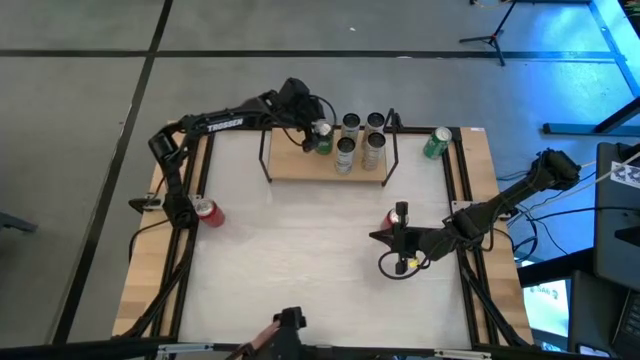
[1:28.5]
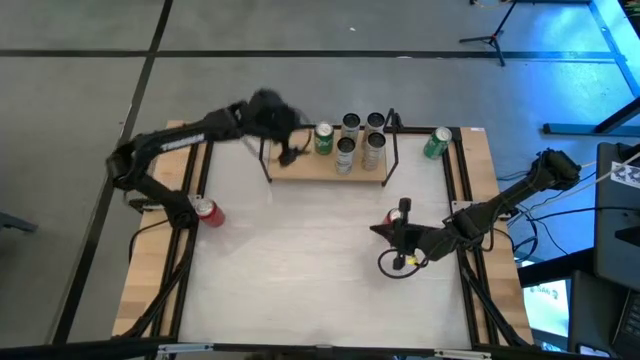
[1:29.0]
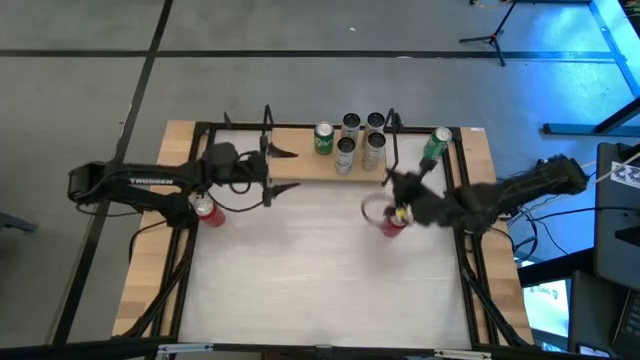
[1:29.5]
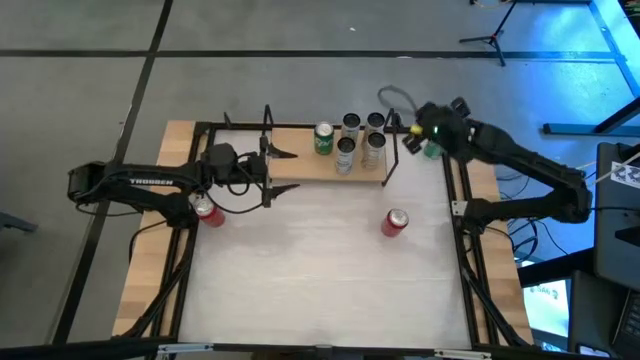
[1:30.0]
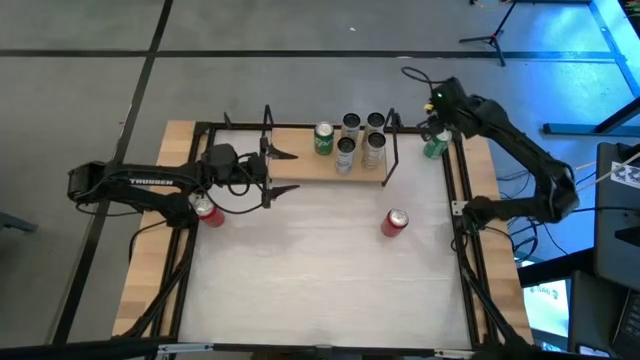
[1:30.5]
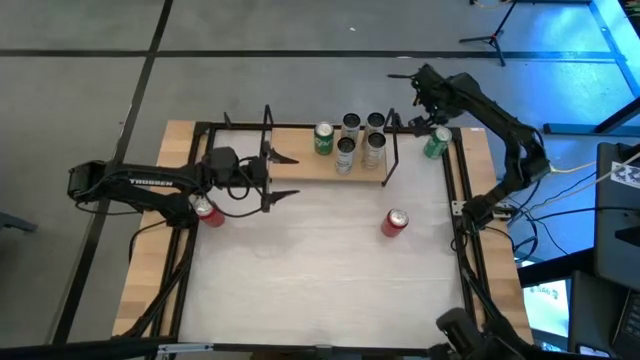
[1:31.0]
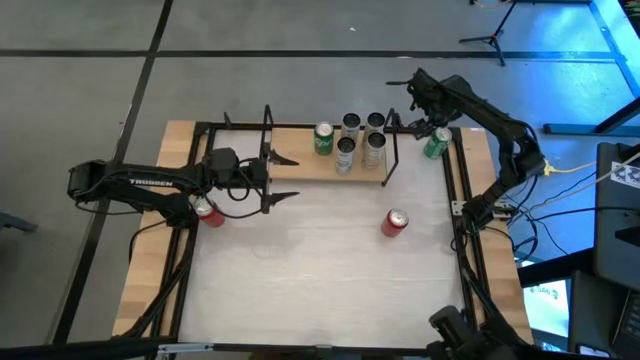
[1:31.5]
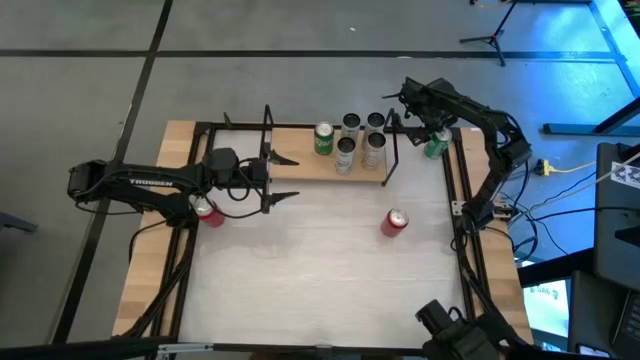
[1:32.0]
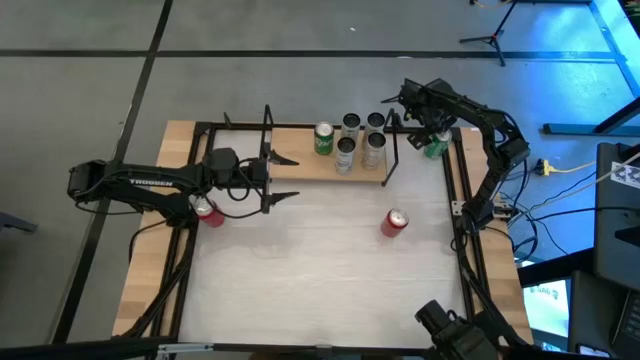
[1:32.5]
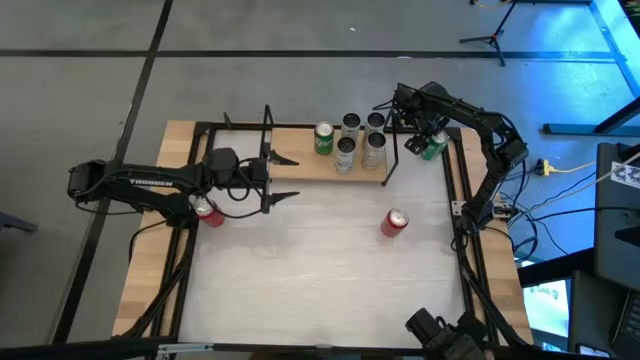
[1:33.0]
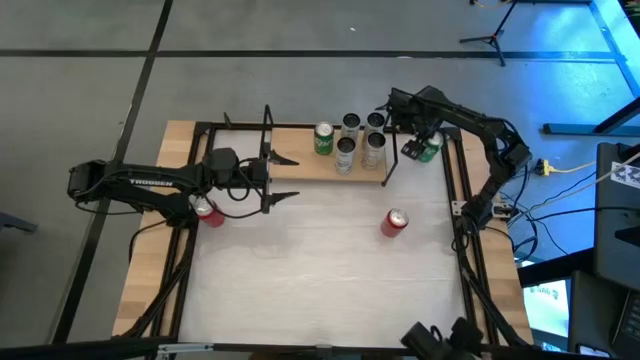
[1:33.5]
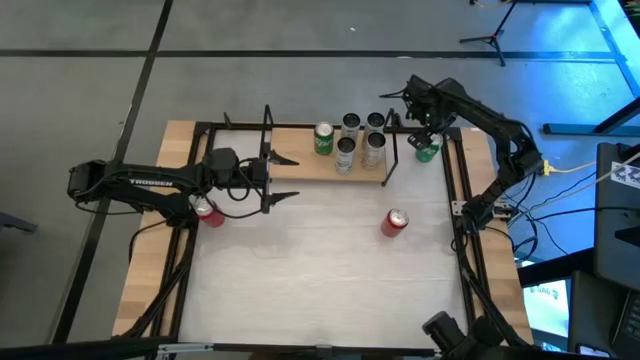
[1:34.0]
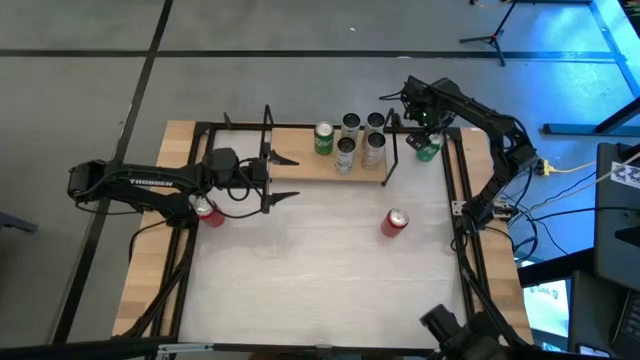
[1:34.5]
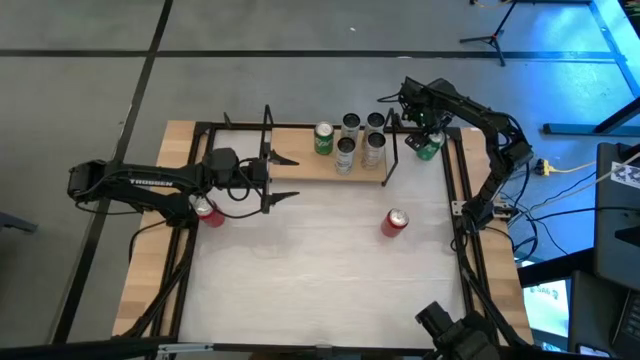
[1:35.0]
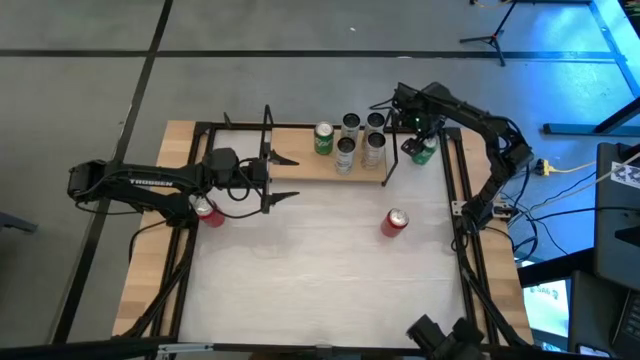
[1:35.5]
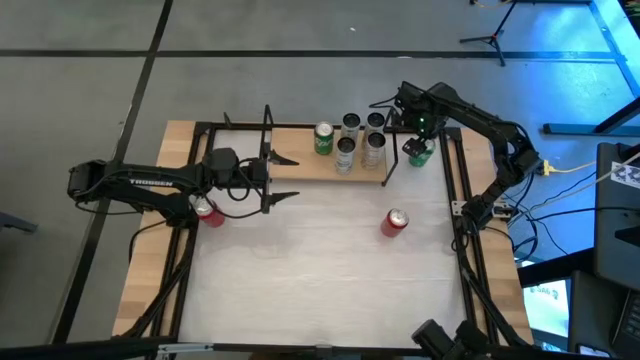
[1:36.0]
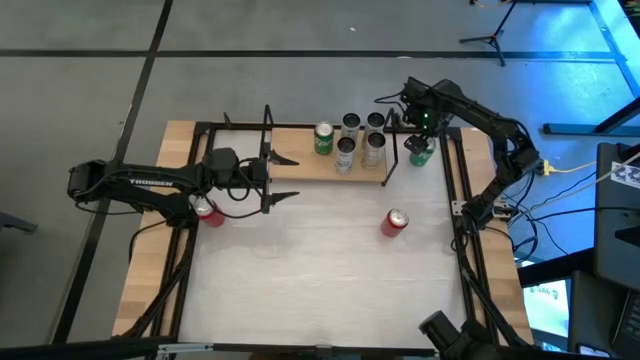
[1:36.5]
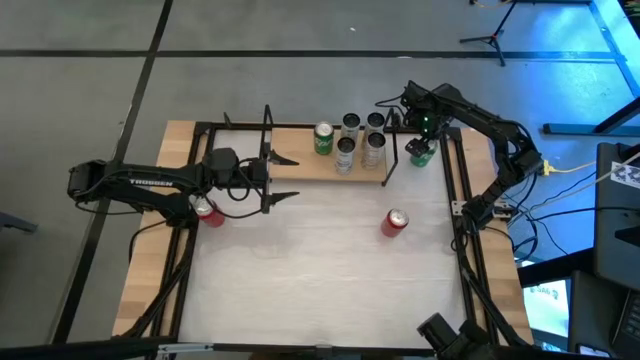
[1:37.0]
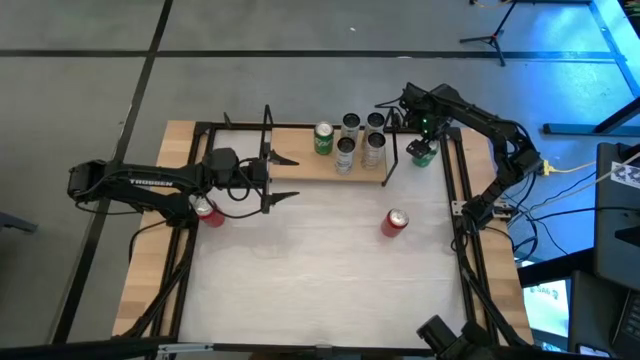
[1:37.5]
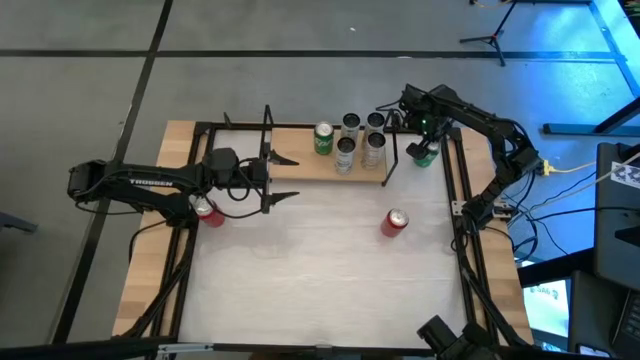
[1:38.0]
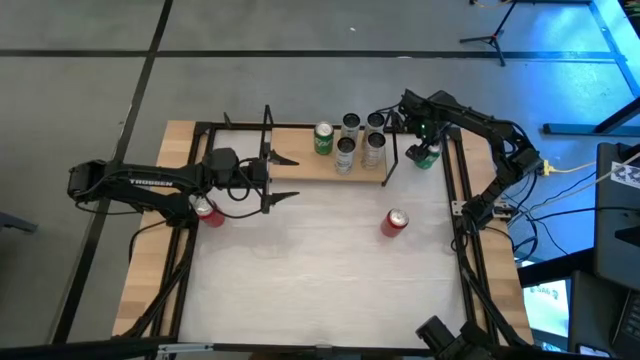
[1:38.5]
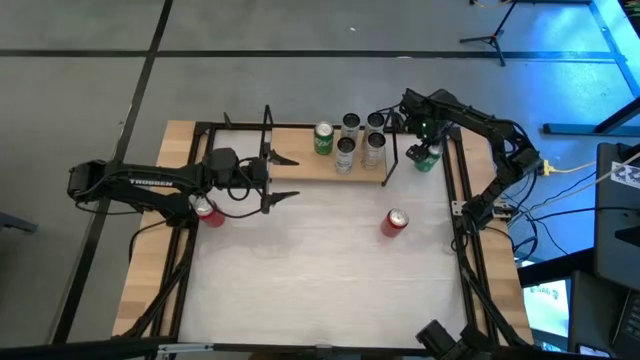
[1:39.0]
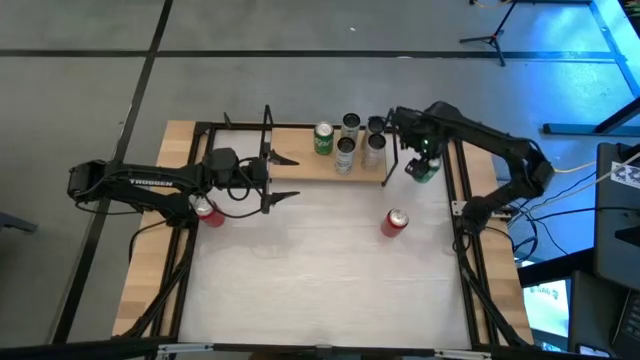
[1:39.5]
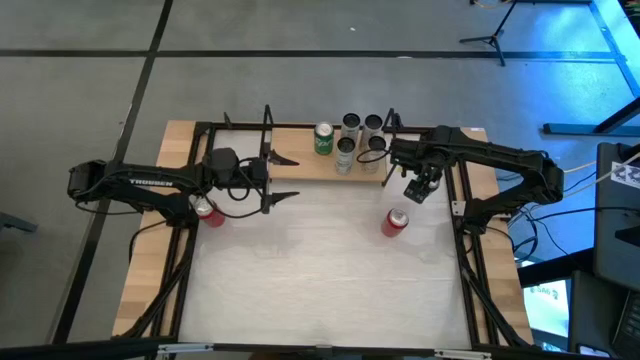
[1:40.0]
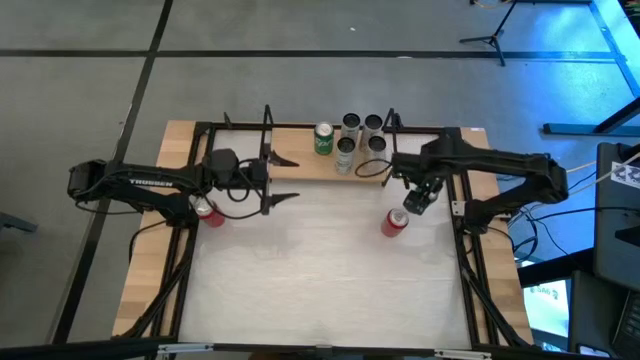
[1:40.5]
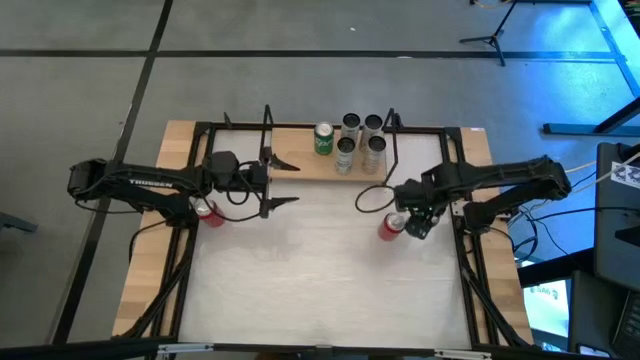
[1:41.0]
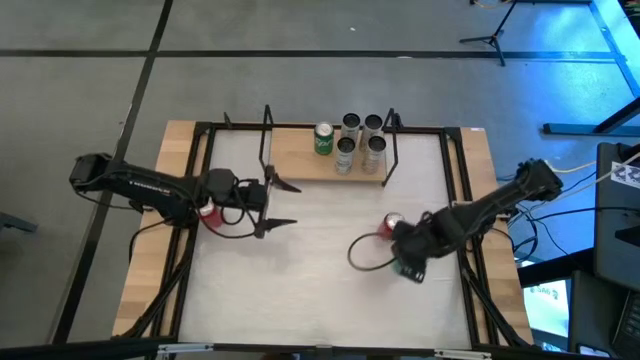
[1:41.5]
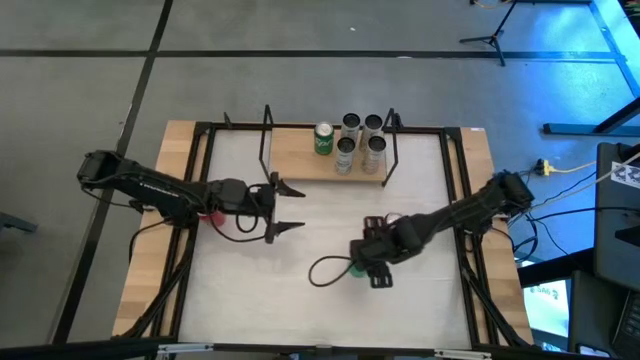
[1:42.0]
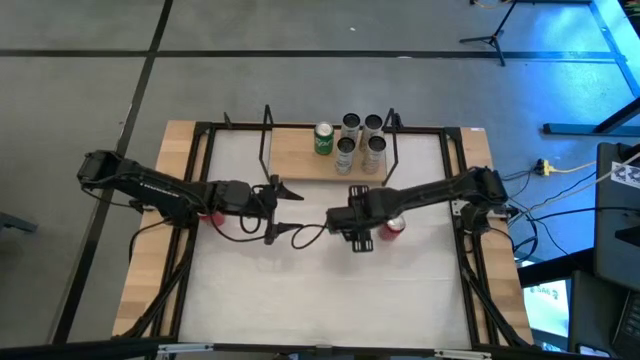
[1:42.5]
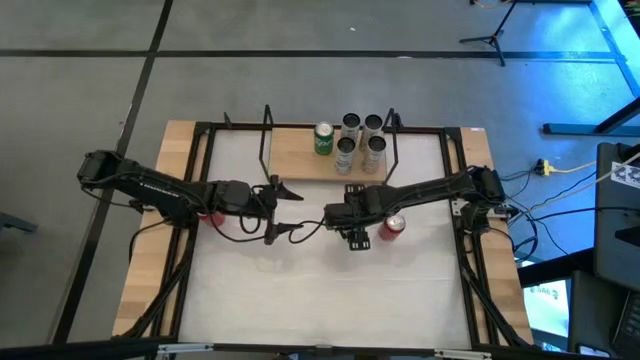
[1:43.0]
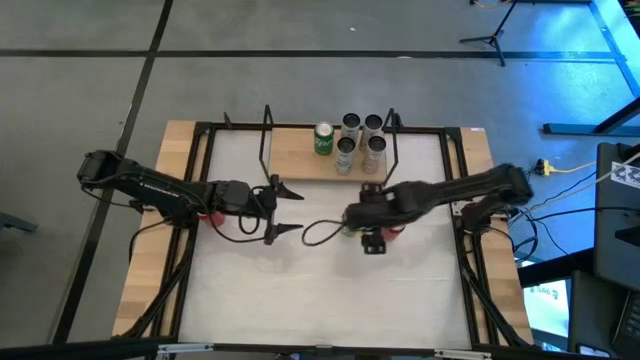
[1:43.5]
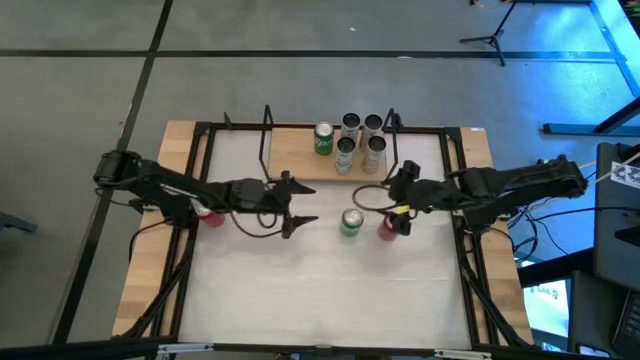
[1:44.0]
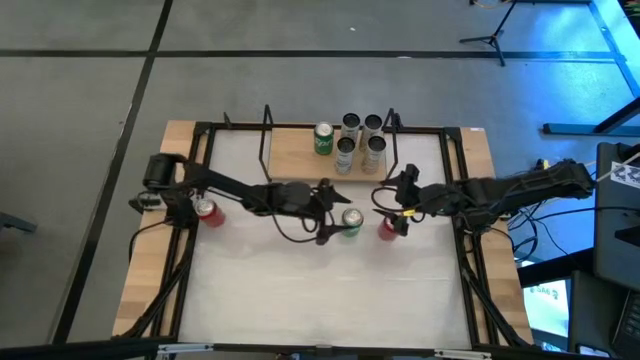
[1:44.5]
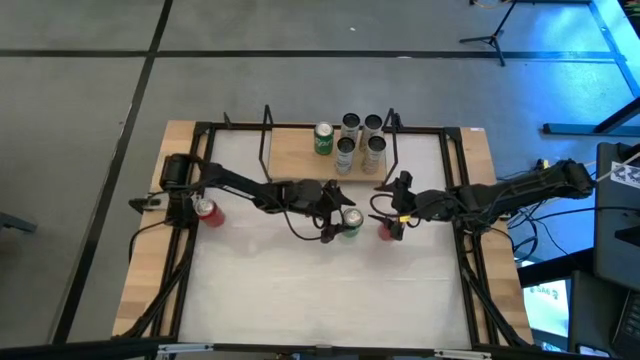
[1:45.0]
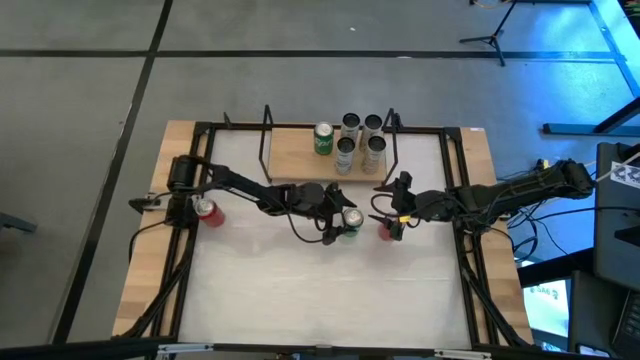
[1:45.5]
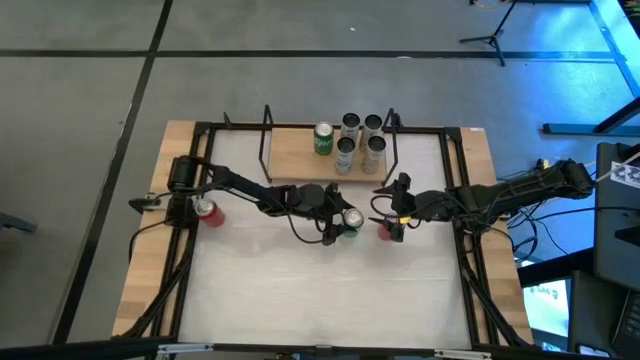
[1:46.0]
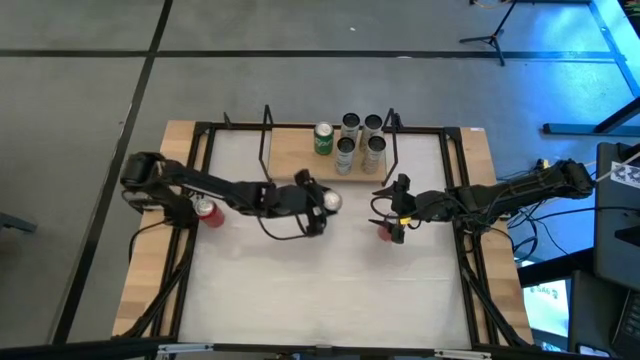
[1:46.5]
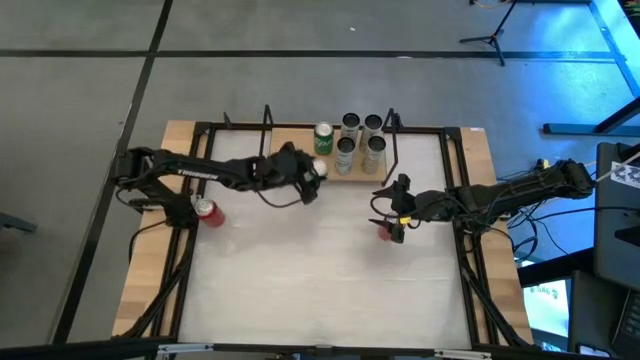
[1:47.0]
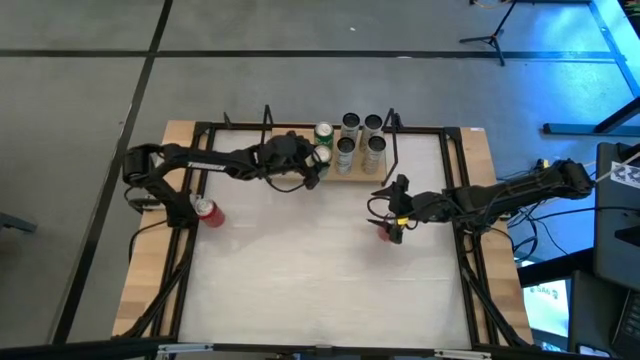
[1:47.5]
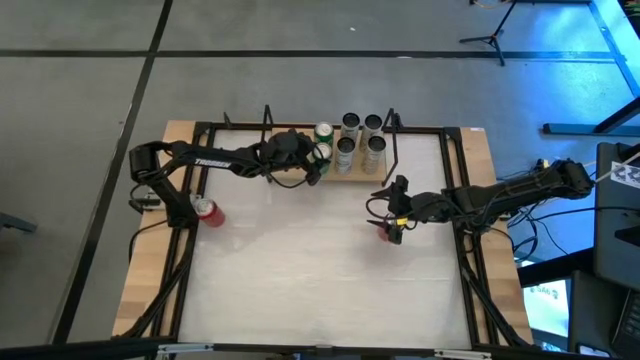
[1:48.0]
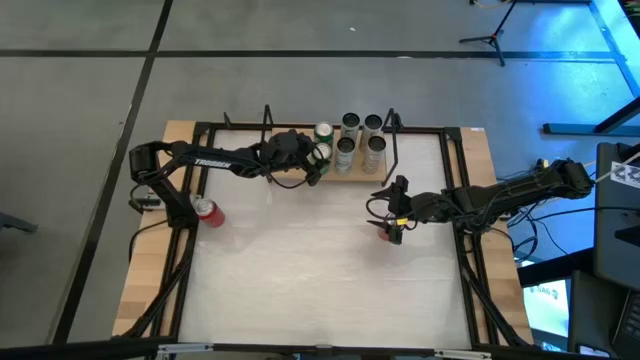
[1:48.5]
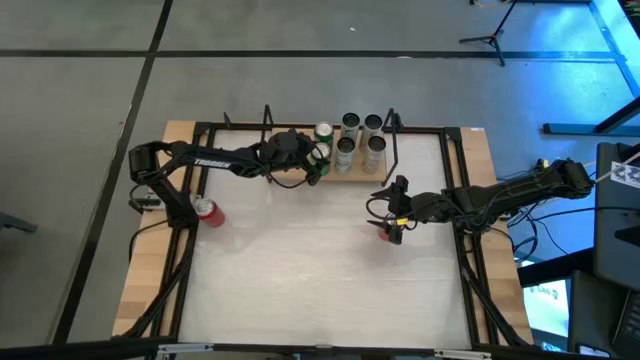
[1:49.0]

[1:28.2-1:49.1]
Task: Place canned beverage on shelf
Put the green soda can on the shelf
